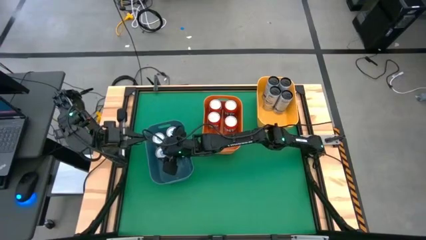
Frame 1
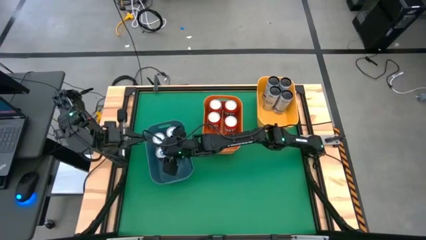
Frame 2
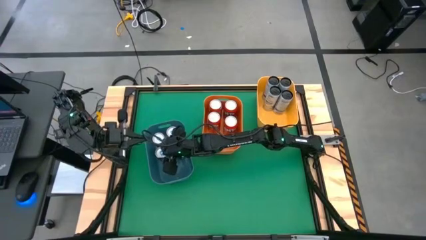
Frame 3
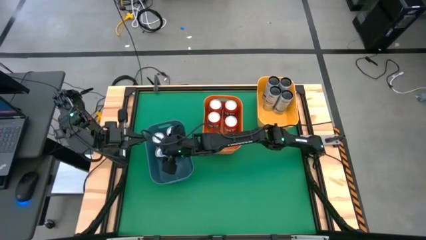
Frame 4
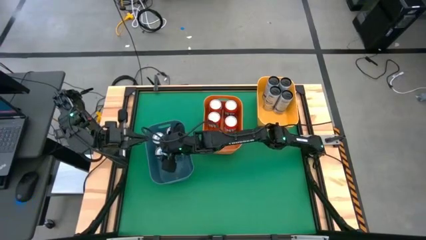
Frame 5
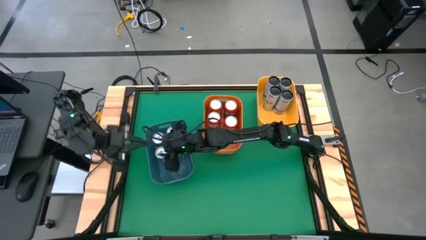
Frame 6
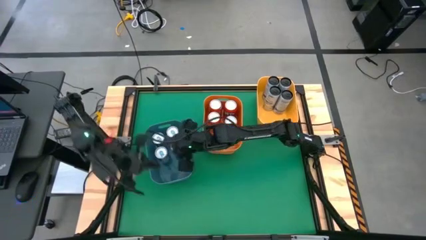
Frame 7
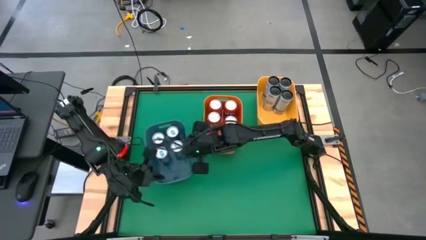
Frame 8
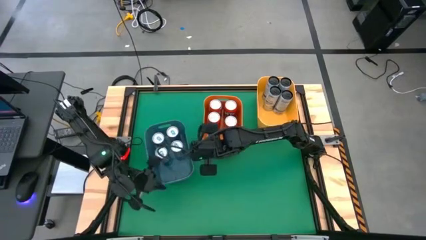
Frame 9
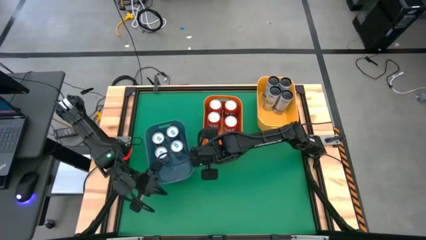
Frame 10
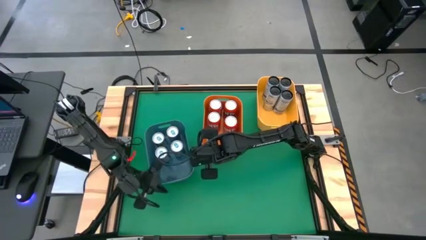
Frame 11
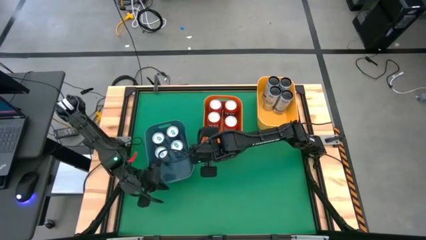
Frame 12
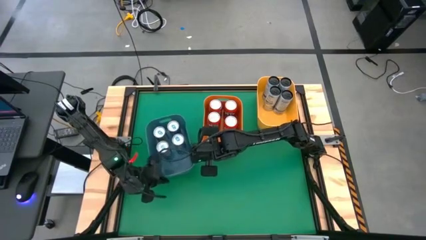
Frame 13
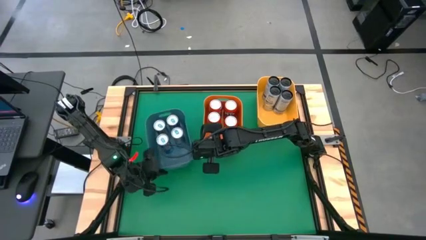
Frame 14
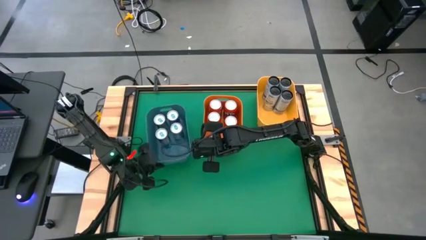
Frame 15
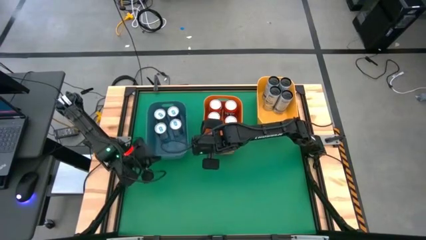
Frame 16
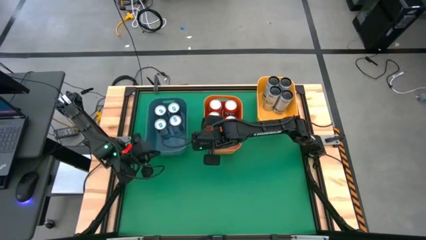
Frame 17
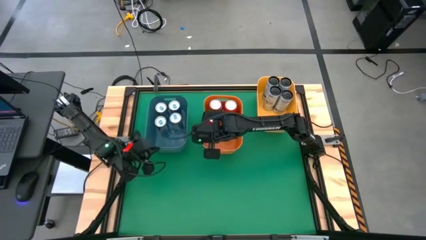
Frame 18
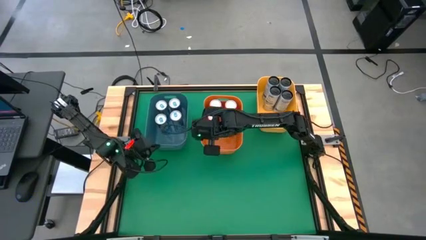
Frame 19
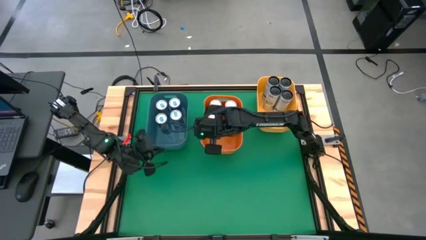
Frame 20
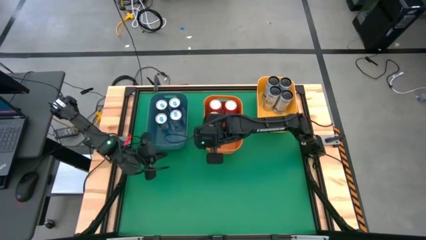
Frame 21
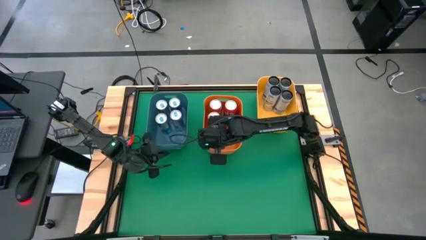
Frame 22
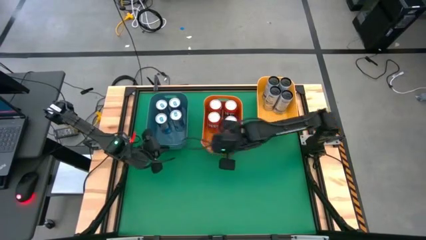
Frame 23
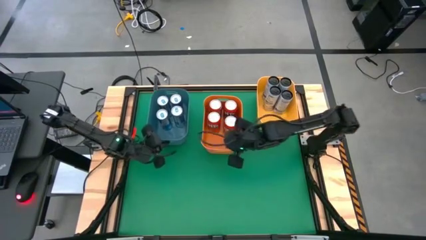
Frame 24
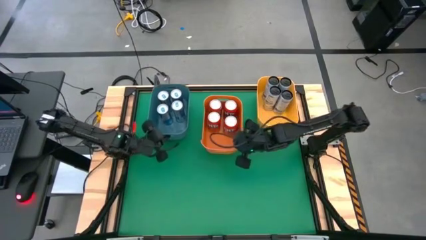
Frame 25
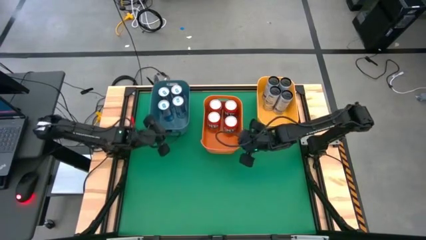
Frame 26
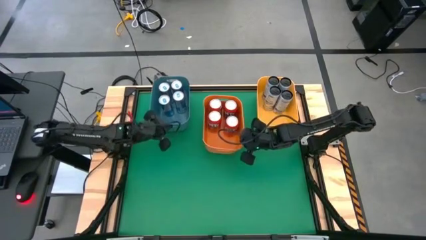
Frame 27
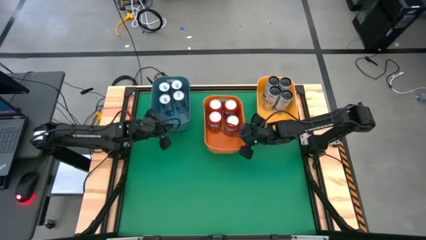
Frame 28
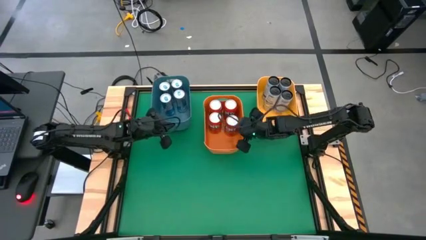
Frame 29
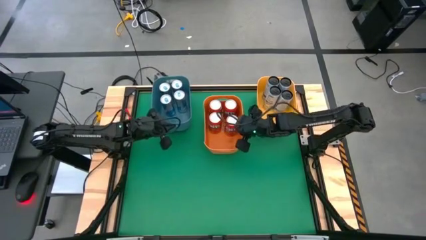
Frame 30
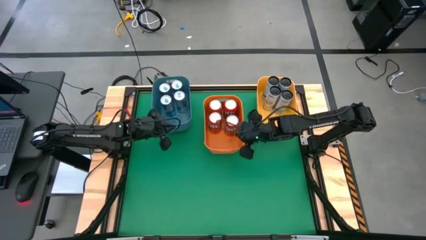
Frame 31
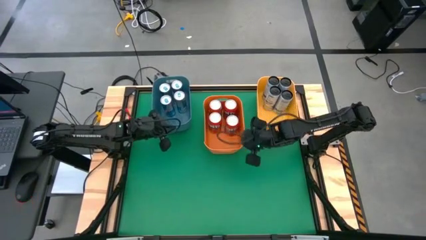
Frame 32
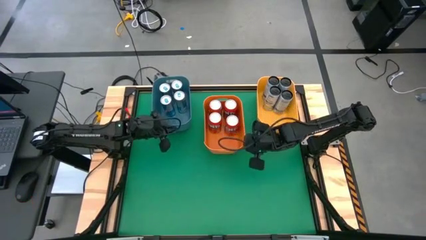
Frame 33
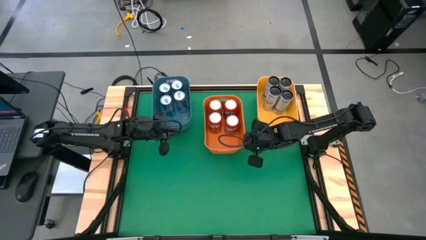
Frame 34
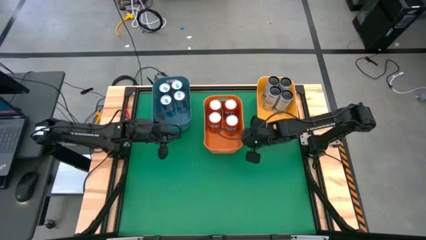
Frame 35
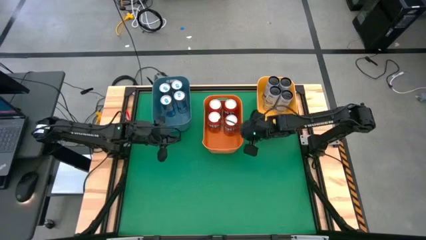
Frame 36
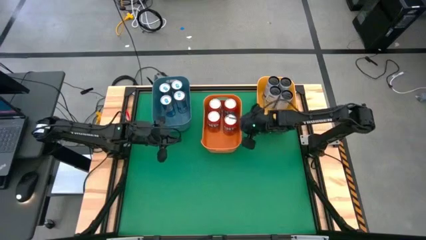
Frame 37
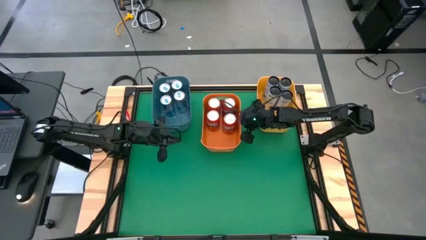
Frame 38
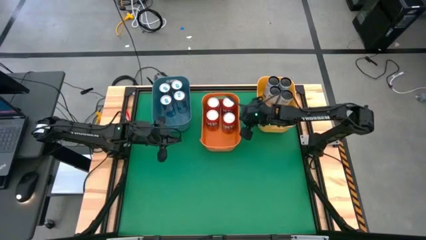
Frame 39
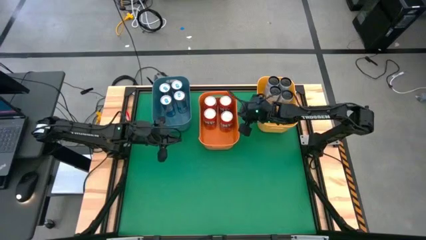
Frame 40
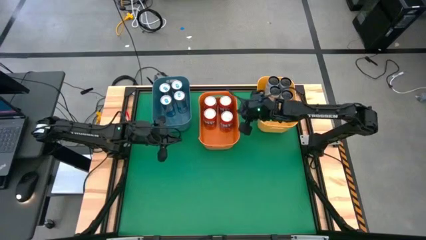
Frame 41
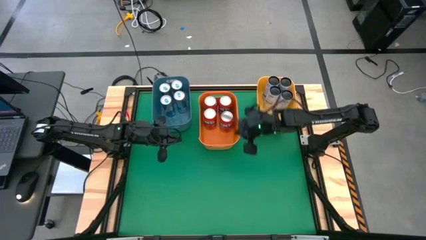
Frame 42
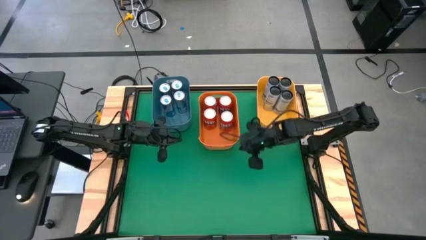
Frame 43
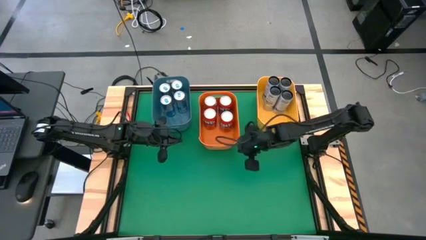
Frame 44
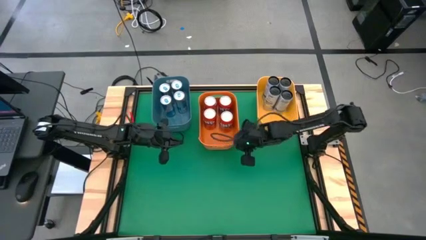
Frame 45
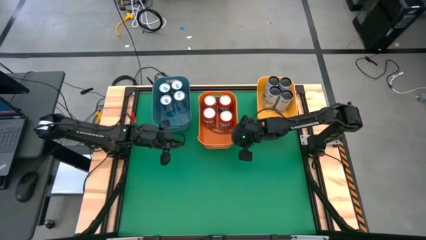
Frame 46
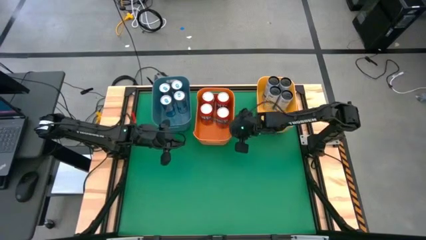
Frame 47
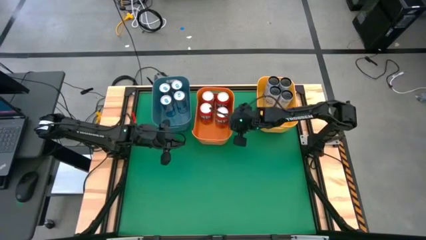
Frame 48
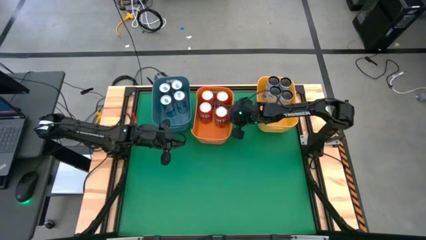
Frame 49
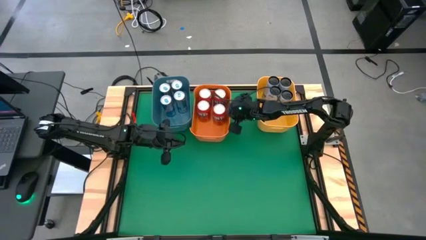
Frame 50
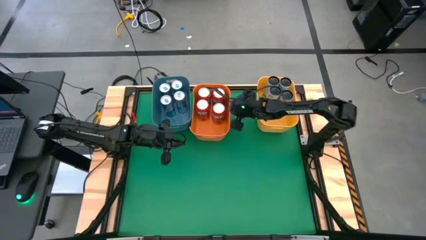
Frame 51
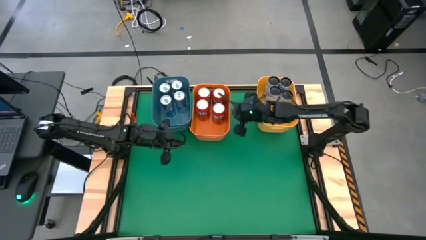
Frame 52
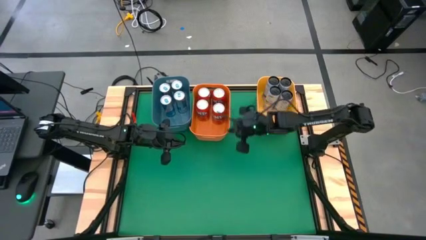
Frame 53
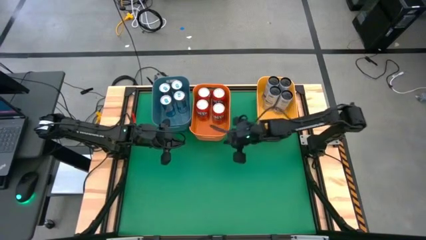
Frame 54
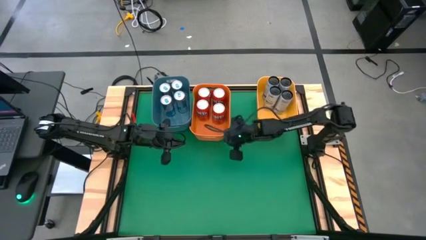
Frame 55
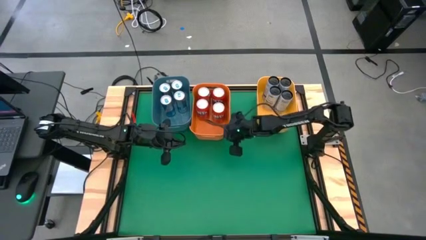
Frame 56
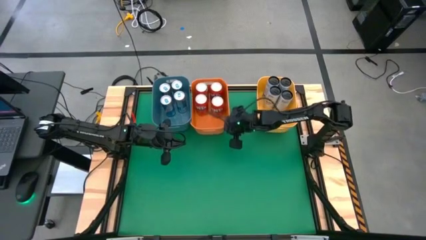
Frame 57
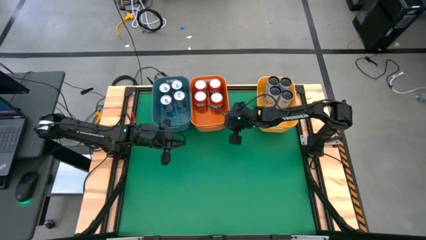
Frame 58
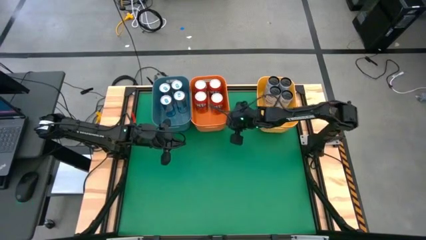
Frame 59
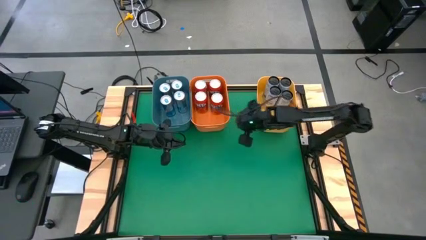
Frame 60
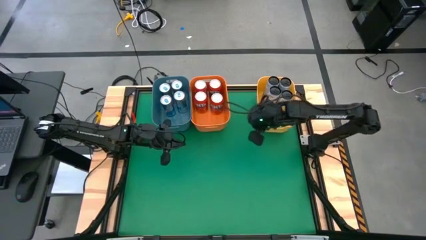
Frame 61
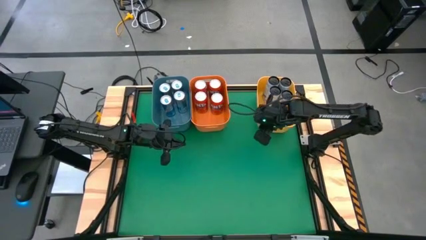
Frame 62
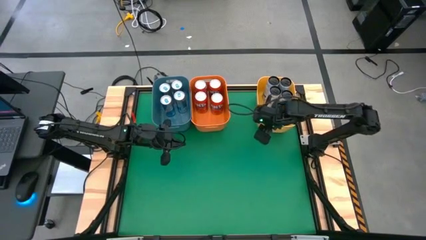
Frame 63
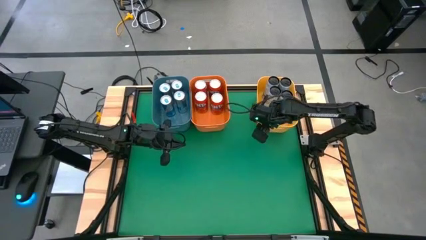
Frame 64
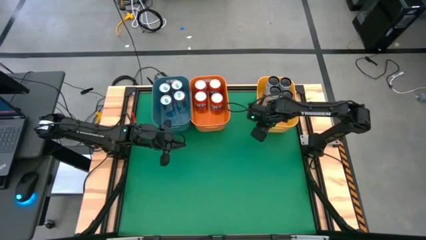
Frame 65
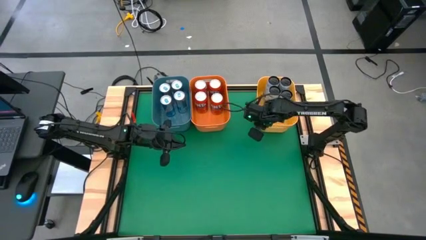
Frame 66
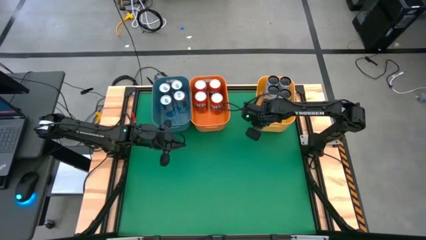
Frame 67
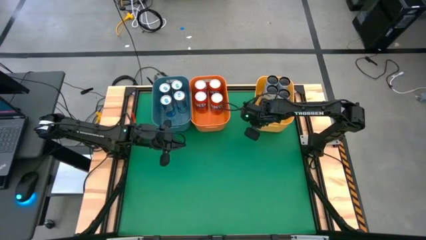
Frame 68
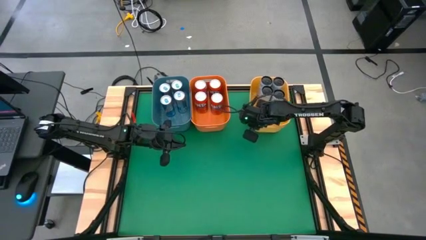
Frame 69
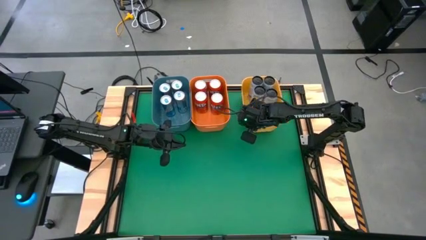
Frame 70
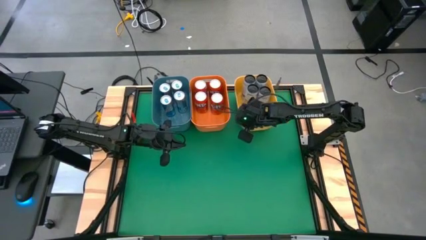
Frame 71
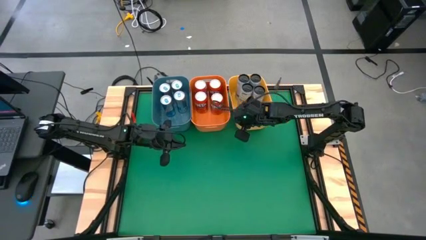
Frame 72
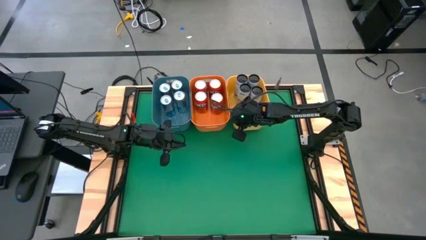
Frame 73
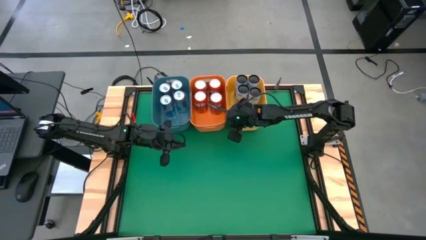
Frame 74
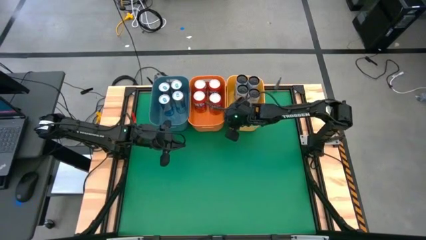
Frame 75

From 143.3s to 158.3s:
Task: Sort soda cans
Adjust the bins
